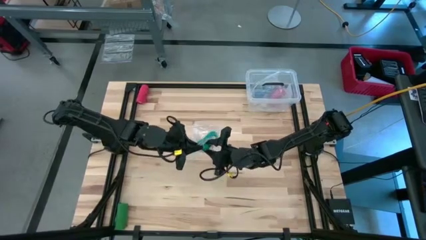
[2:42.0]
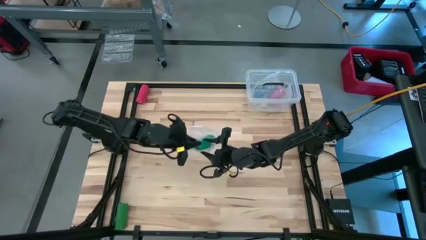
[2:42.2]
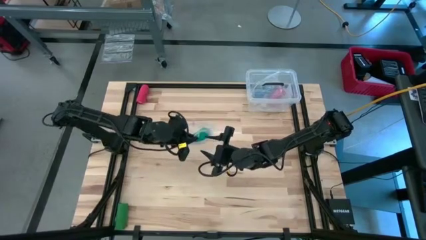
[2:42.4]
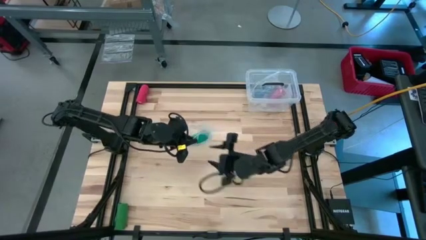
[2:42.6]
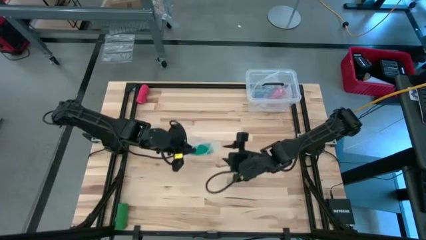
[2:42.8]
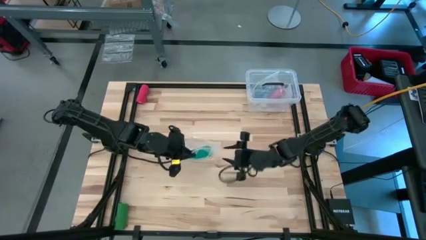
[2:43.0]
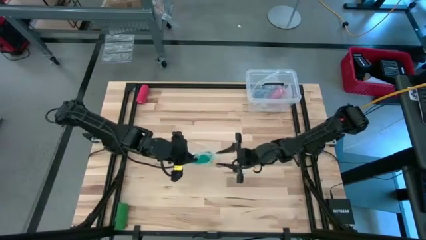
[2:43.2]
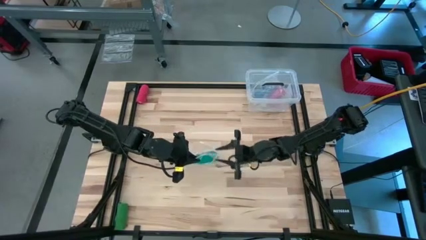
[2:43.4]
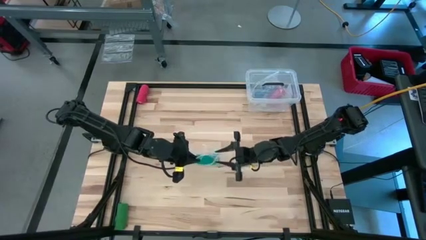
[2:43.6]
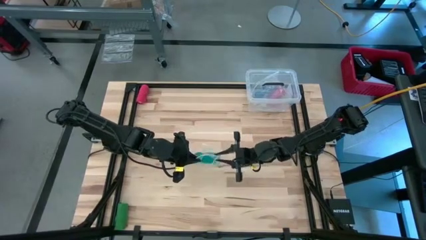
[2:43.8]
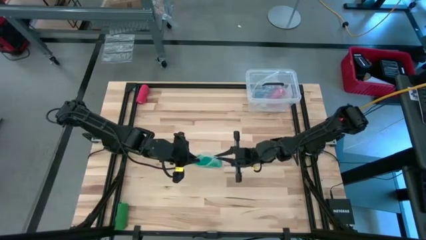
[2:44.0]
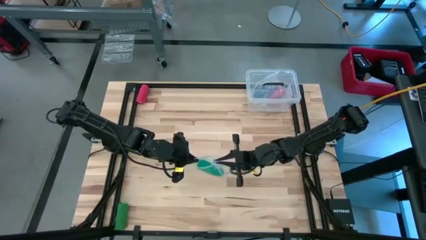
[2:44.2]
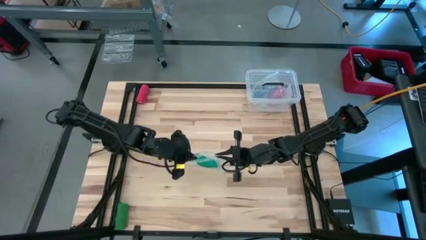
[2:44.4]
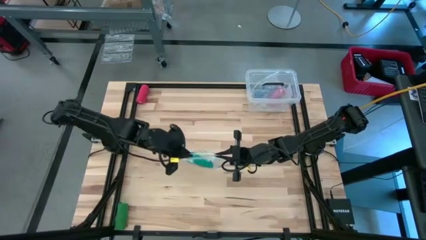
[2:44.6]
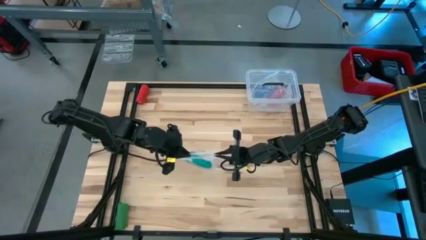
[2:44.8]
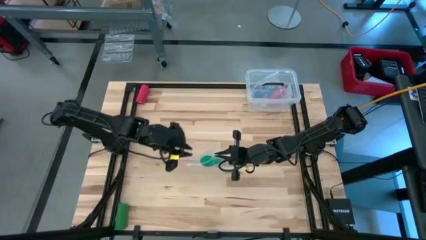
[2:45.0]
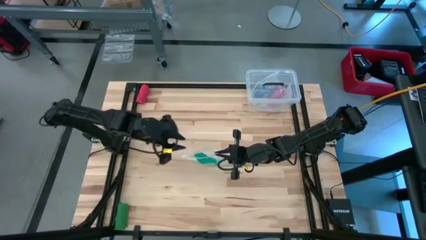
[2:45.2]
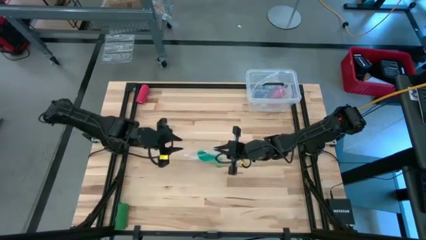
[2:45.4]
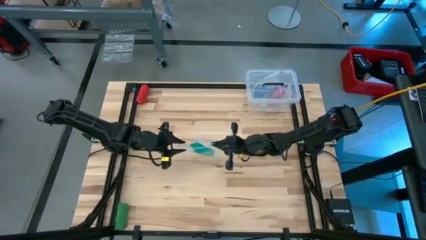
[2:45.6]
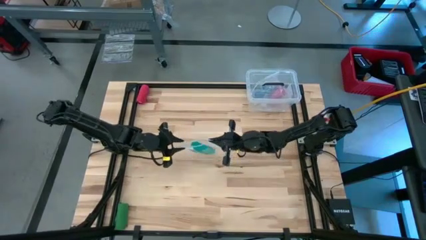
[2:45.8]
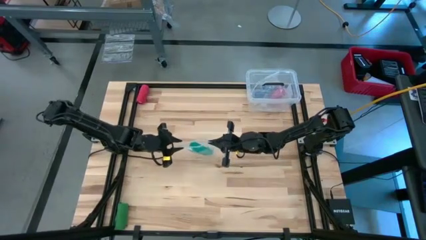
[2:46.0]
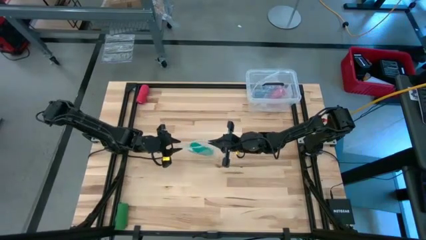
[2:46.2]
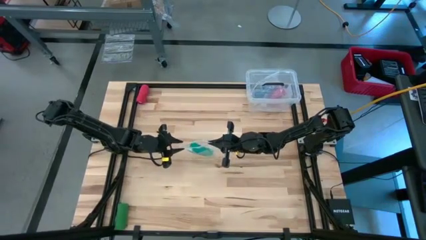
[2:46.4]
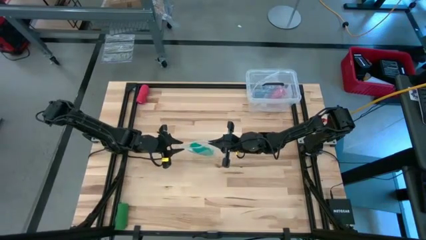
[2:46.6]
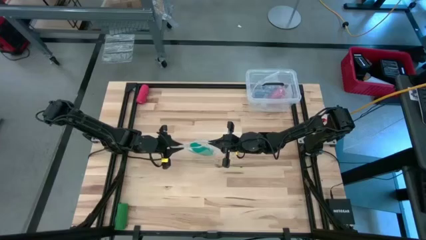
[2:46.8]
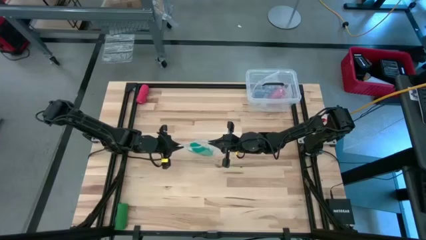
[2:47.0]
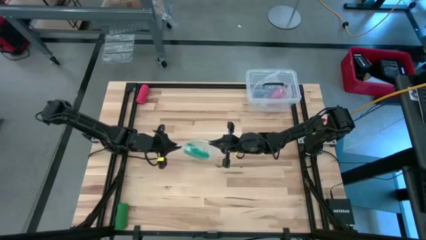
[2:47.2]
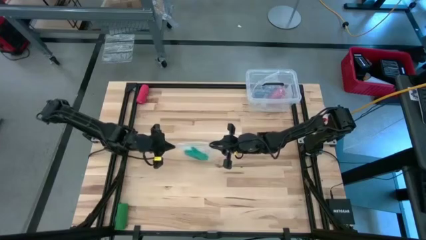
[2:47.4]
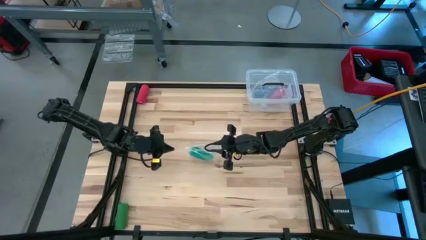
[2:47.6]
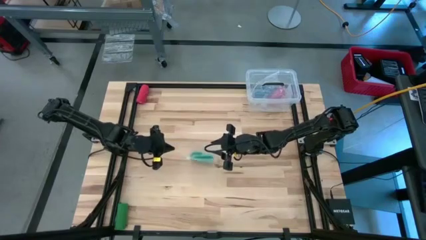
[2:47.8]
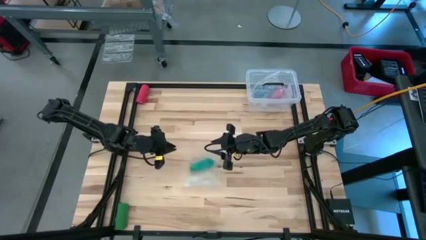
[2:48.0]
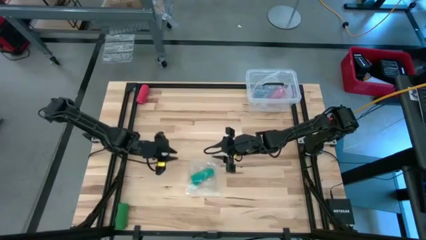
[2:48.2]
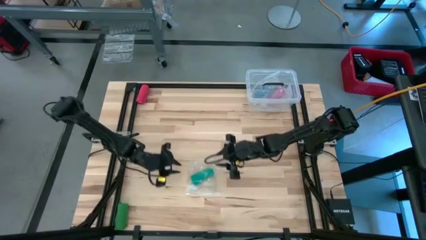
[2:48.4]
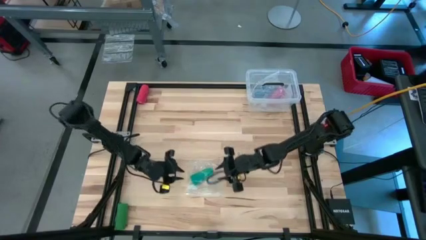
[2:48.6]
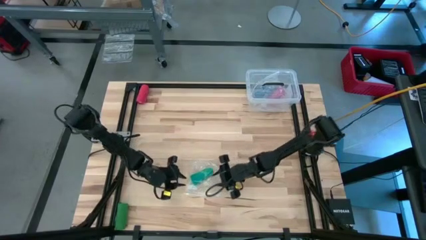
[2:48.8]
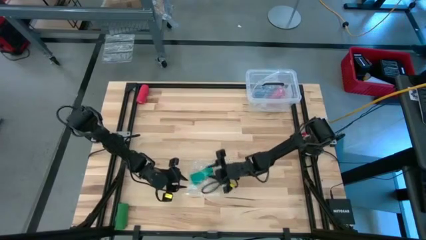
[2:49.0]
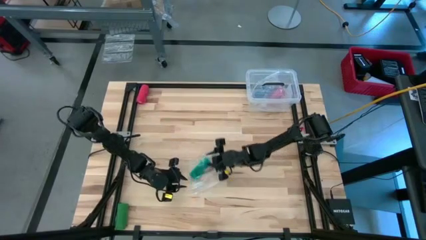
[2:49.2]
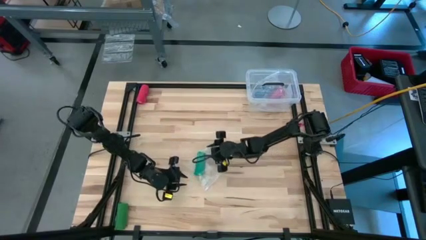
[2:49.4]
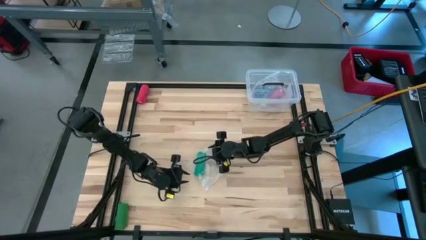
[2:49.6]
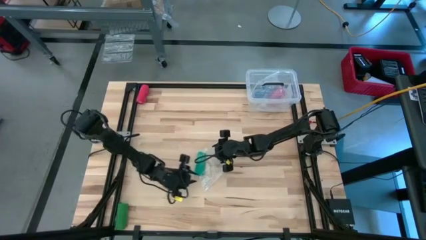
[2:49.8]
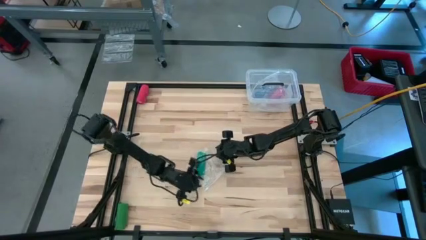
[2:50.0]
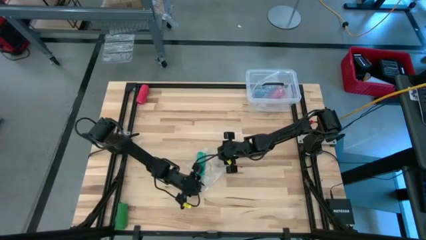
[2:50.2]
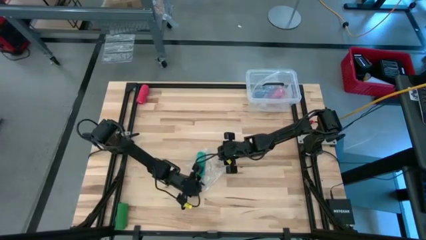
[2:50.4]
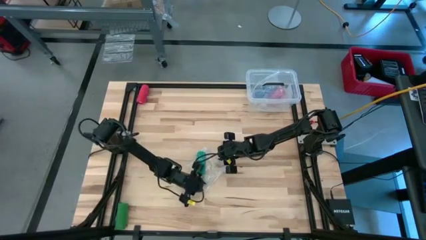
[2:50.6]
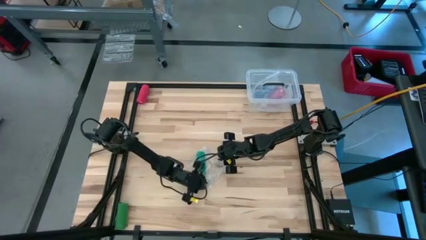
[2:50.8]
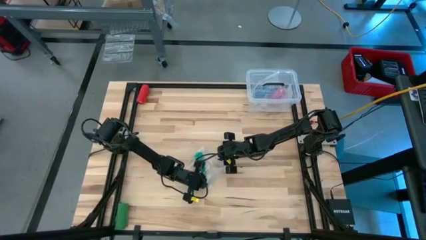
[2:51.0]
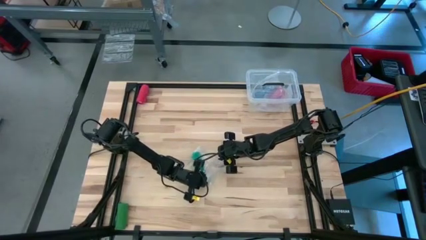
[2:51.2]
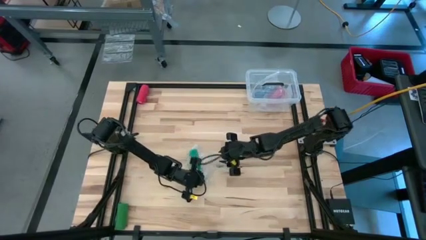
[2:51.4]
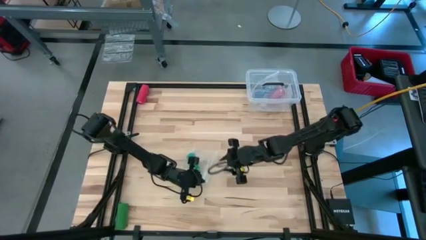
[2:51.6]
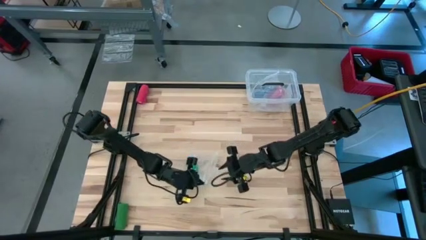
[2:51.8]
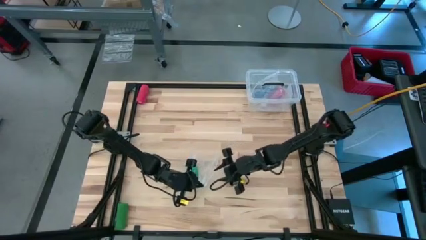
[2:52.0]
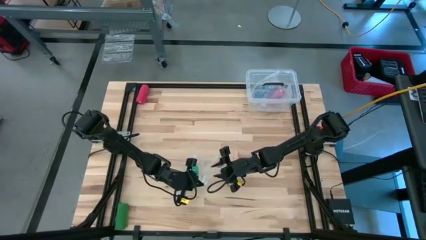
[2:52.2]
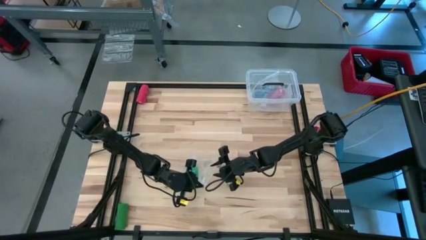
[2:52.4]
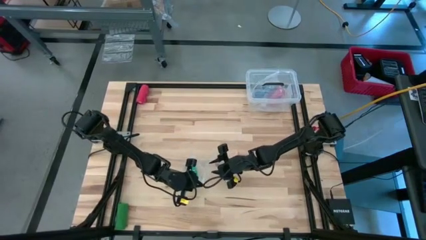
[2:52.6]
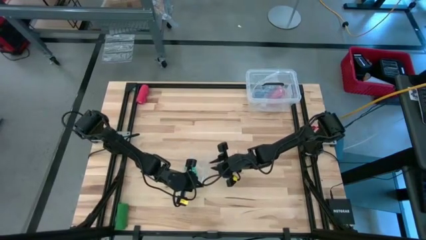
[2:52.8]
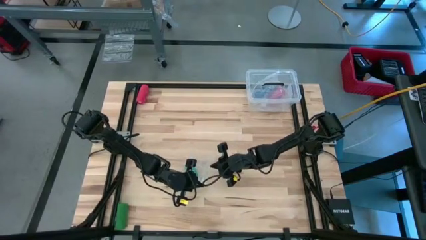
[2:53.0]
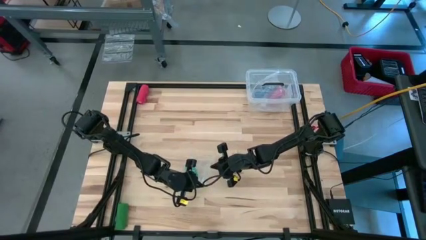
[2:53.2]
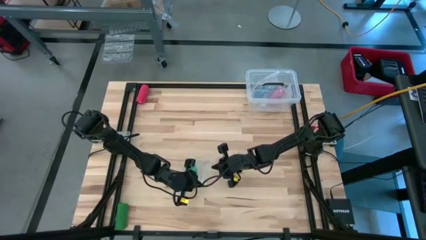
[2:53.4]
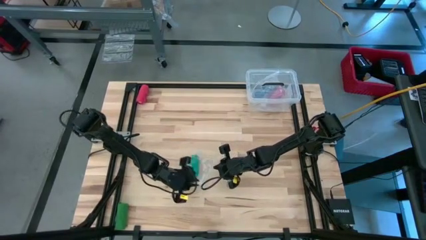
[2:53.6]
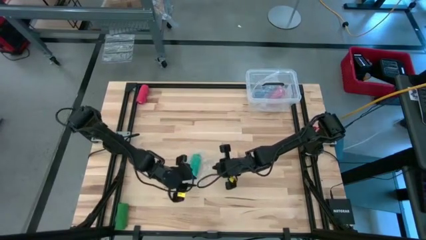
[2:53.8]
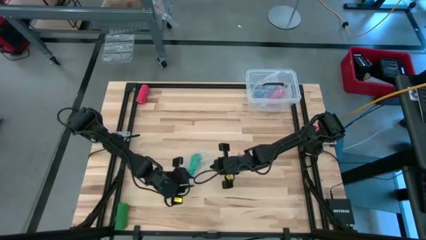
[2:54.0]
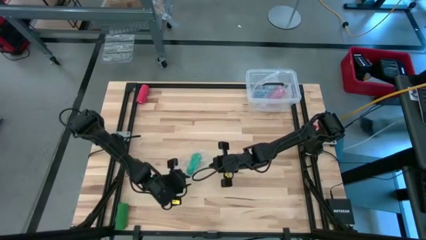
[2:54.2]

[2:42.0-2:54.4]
Task: Roll bandage
Close the transparent zip bag

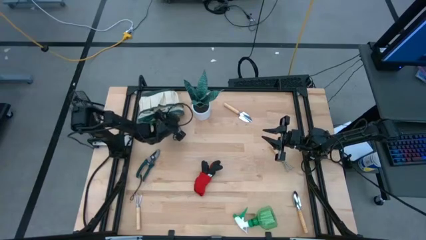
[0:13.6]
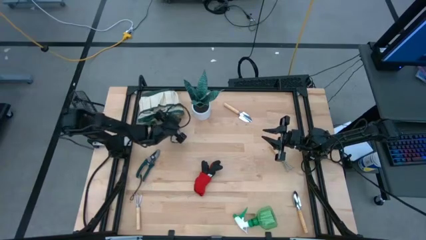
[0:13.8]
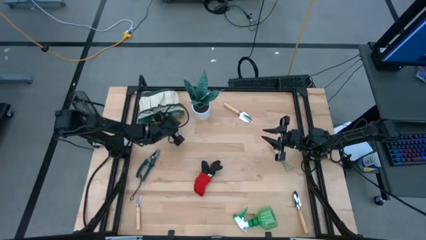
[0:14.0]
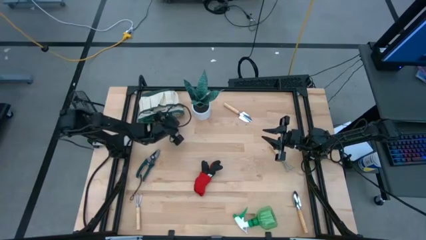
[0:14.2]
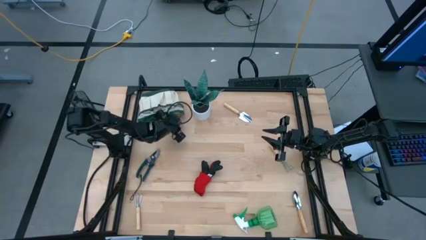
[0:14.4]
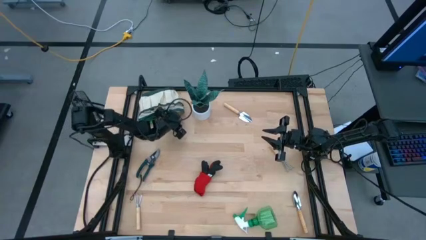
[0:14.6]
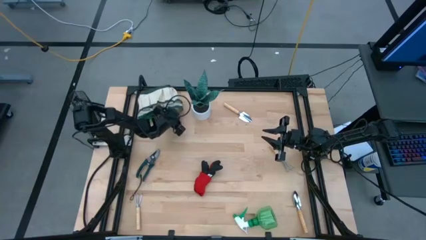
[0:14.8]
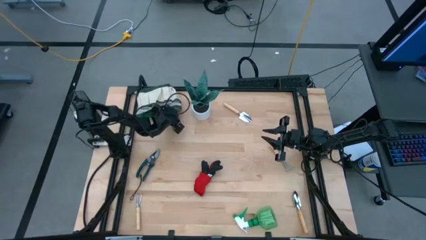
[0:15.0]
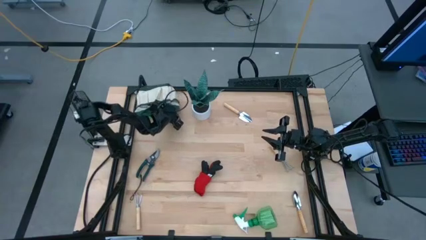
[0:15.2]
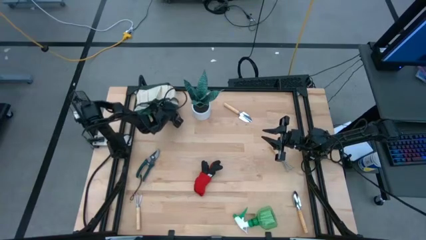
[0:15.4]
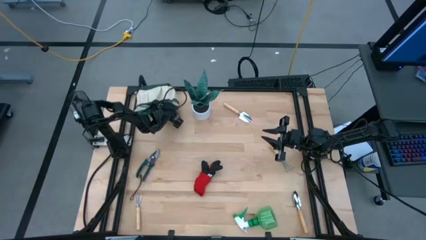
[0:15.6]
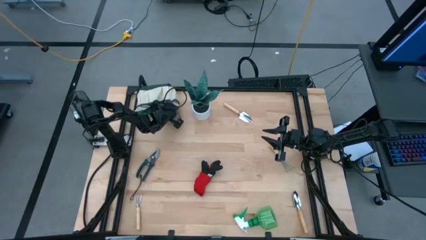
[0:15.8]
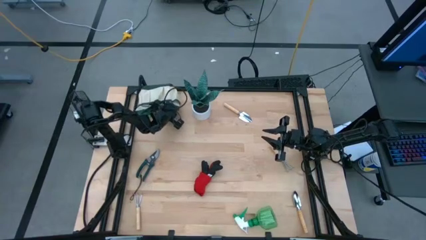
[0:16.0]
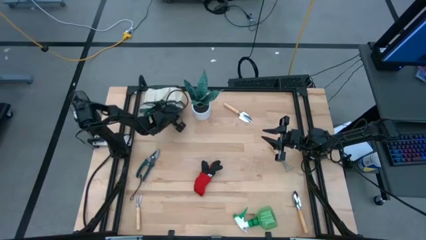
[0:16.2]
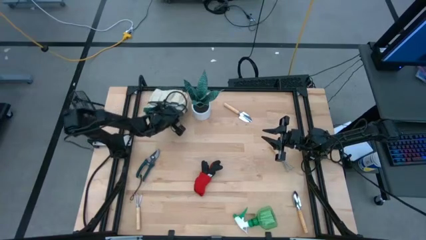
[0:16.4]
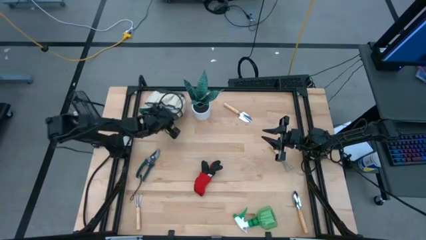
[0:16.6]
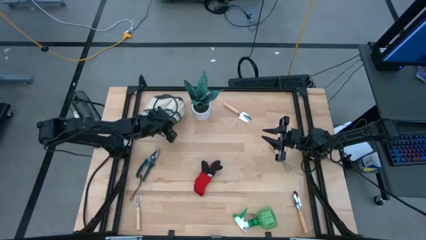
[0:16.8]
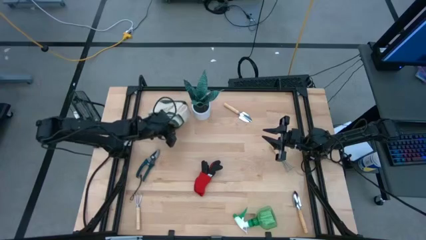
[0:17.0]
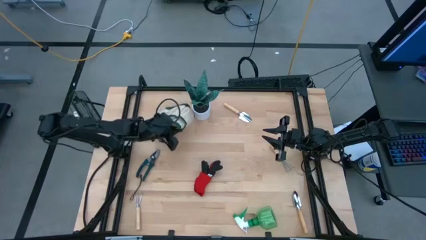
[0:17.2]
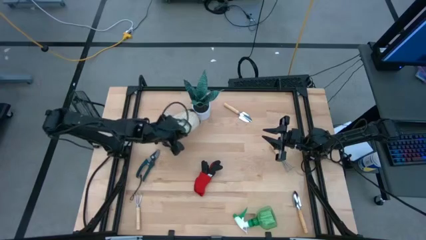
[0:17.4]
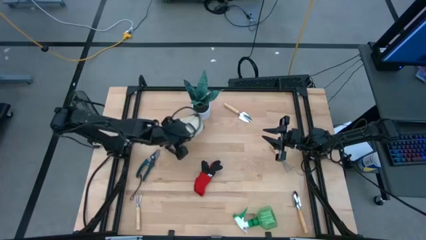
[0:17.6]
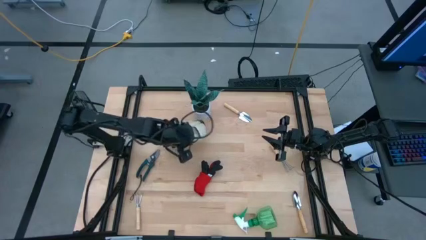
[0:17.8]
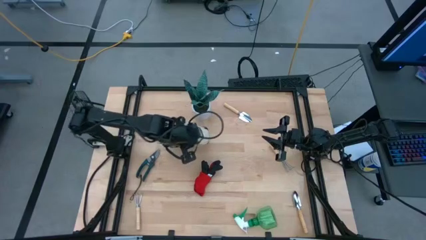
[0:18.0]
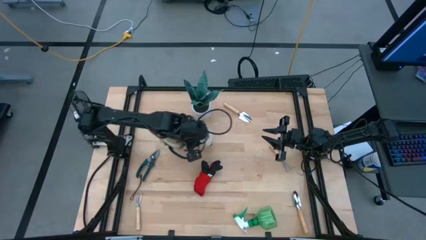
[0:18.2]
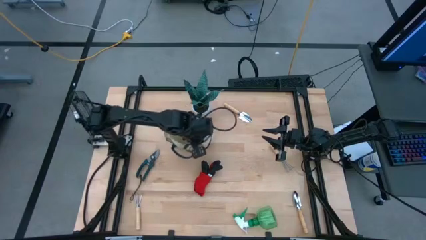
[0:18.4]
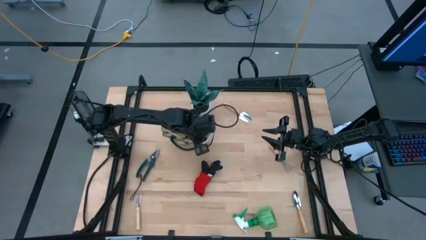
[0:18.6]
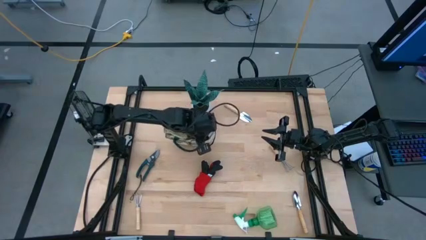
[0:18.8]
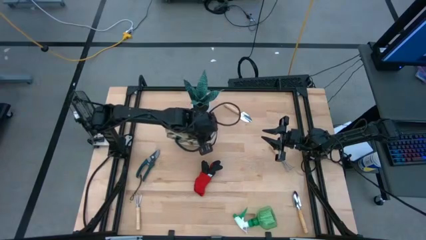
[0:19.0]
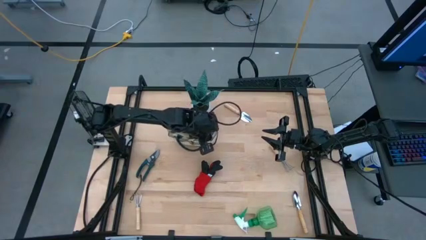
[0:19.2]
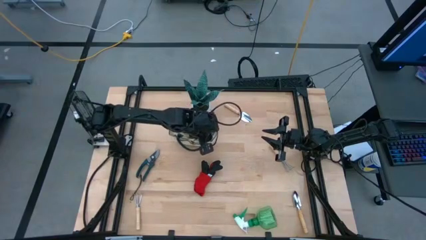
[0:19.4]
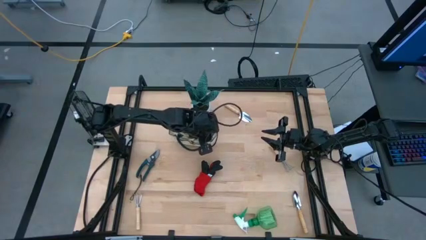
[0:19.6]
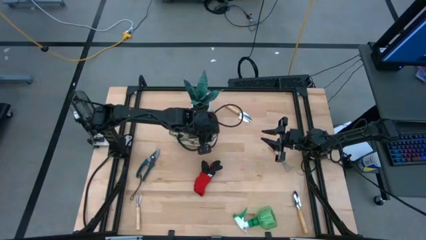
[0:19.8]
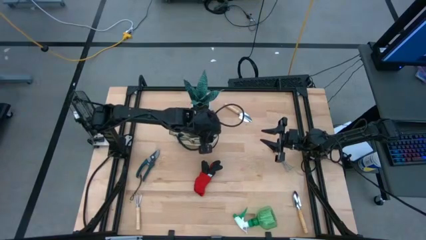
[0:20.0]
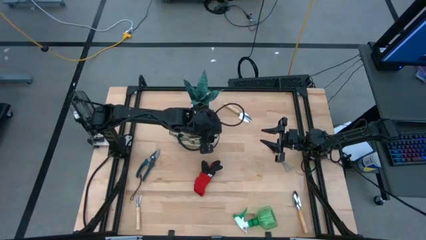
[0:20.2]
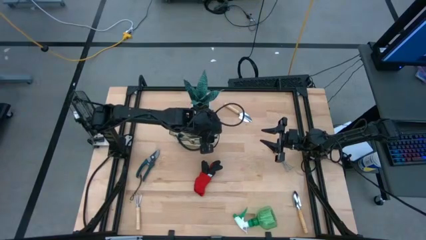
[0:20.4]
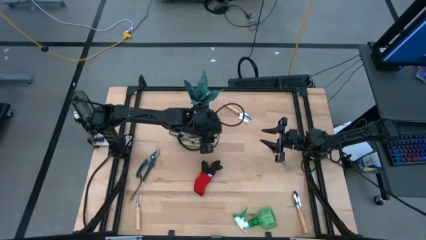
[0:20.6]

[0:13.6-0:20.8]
Task: Pick & Place Garden tools in Gardening bag
Prepare the gardening bag
